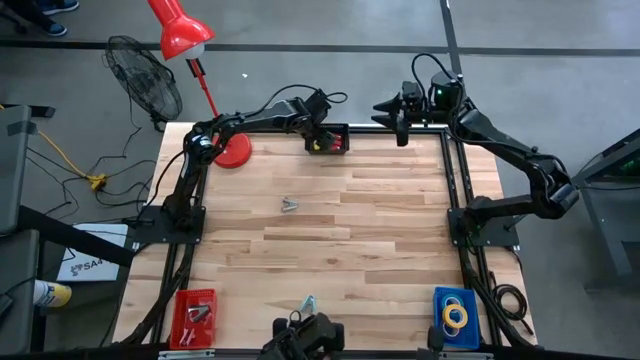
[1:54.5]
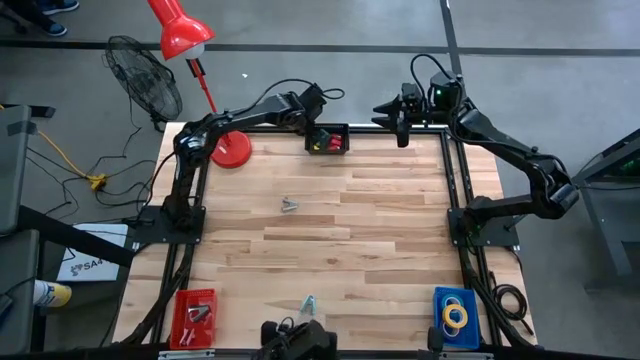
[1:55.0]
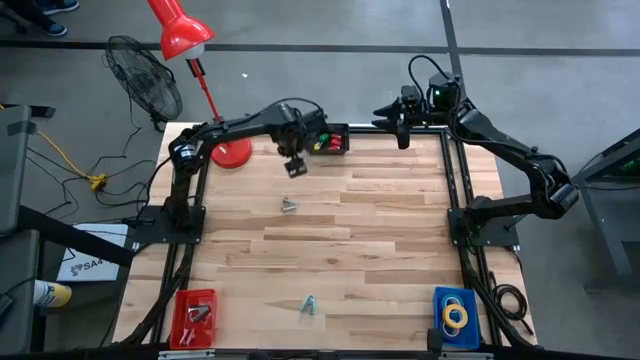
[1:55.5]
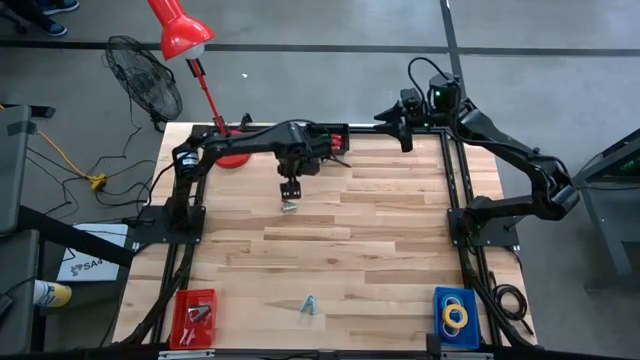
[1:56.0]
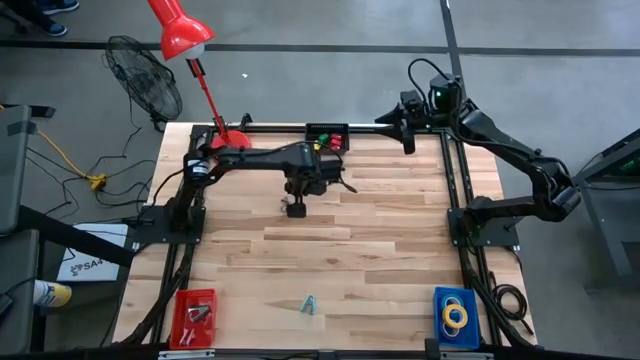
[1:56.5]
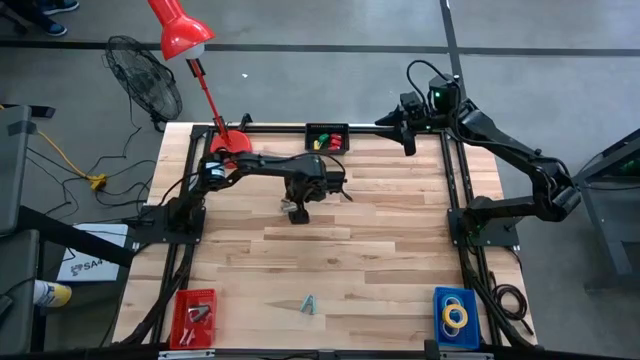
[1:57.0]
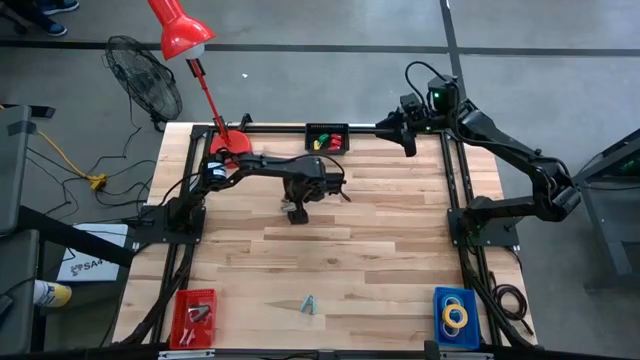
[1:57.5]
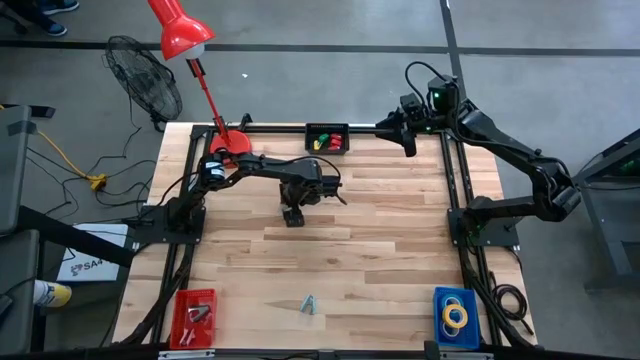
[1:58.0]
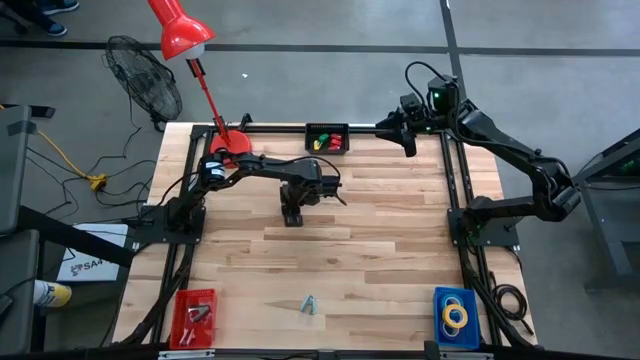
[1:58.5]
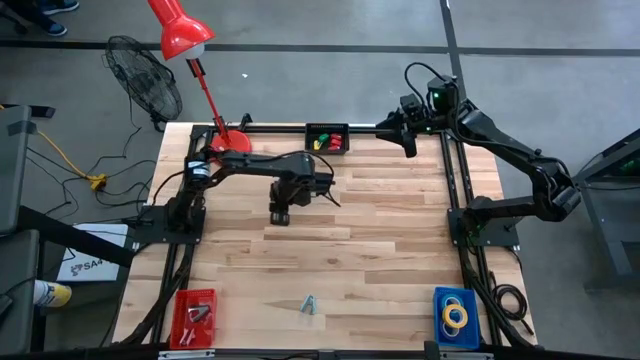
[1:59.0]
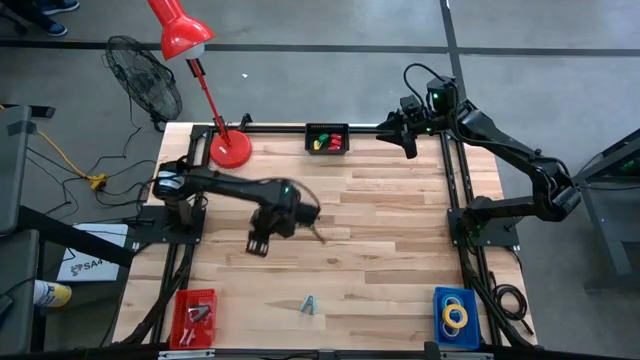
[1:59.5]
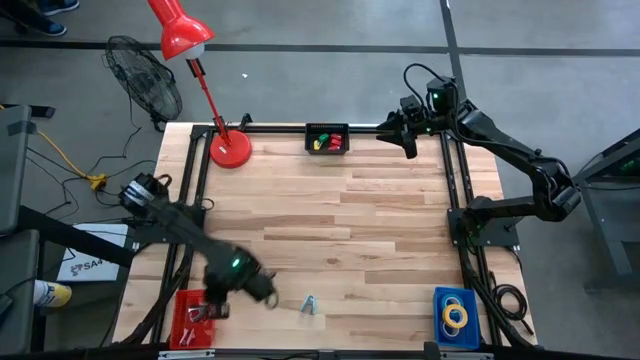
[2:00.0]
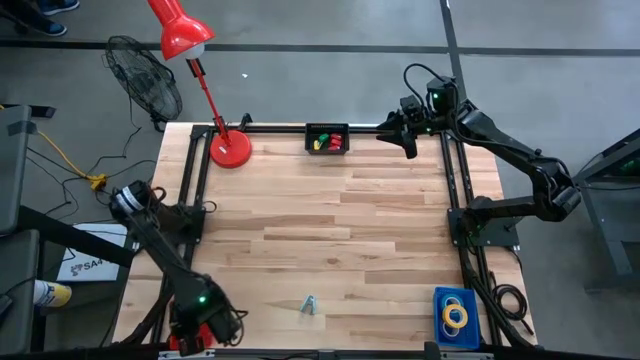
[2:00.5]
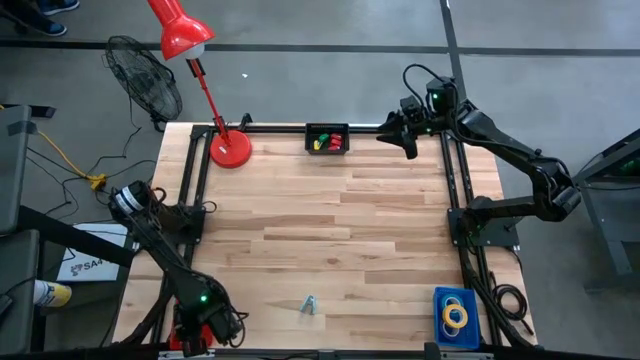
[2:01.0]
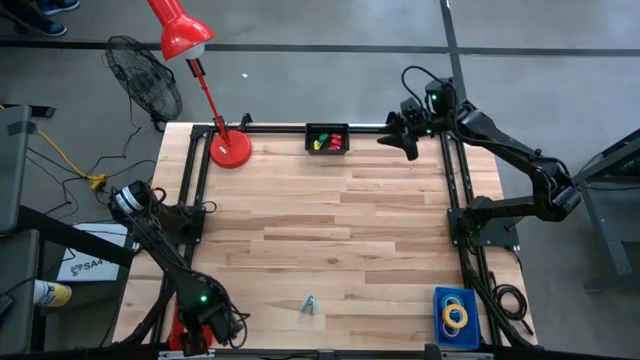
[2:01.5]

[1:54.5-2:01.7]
Task: Pick and place Stapler, Stapler remover, tape
Put the gray staple remover into the red basket

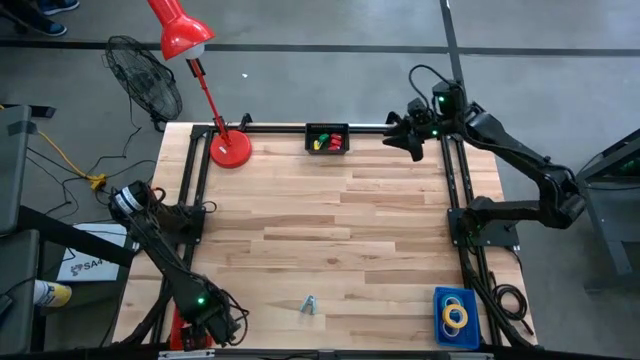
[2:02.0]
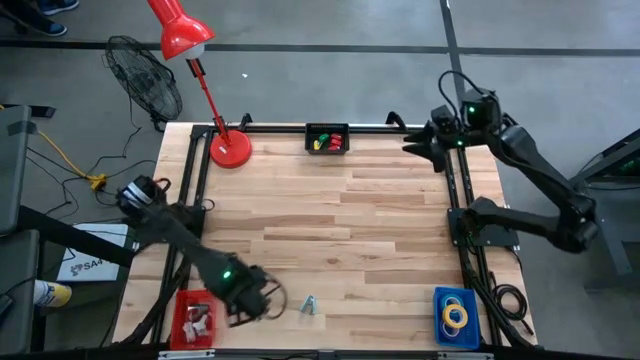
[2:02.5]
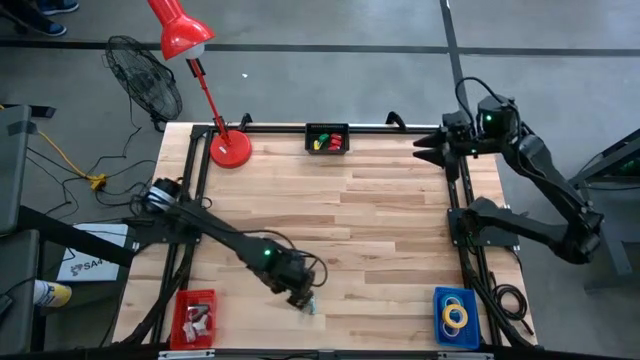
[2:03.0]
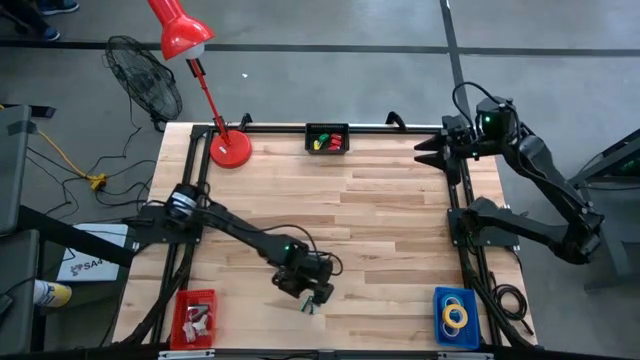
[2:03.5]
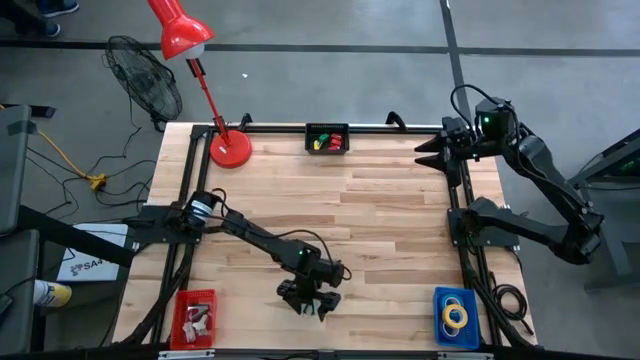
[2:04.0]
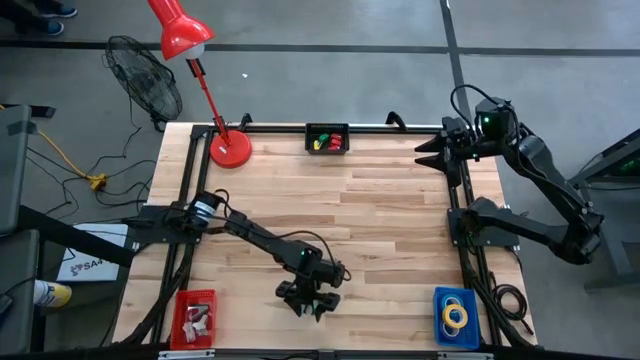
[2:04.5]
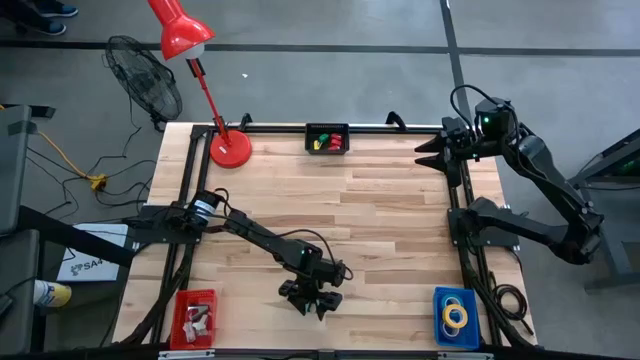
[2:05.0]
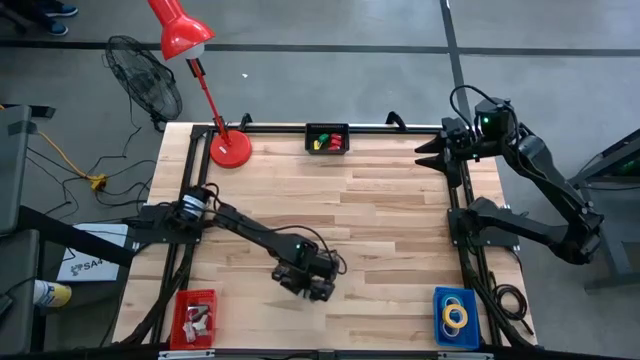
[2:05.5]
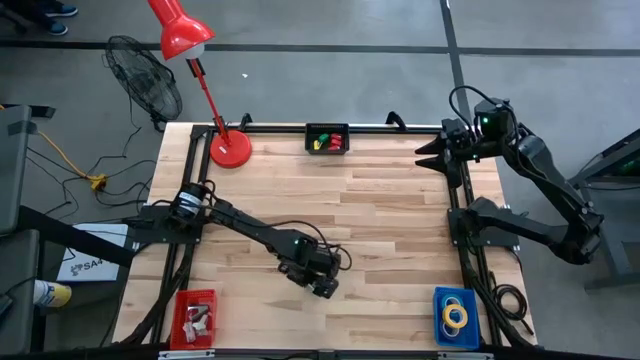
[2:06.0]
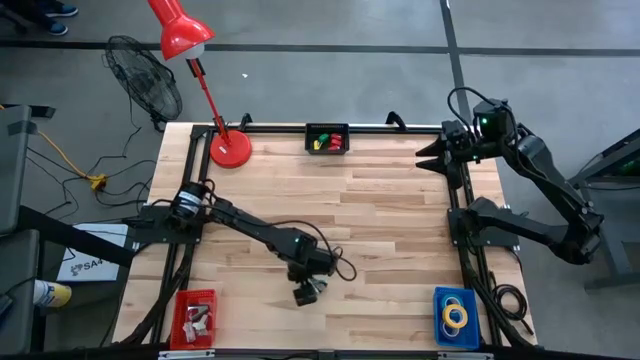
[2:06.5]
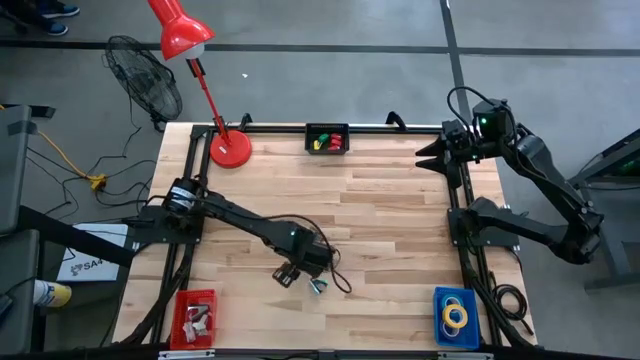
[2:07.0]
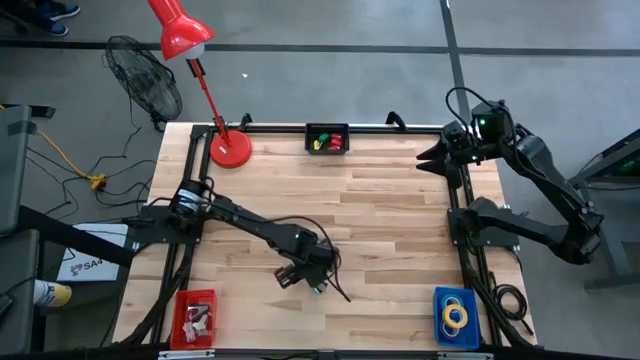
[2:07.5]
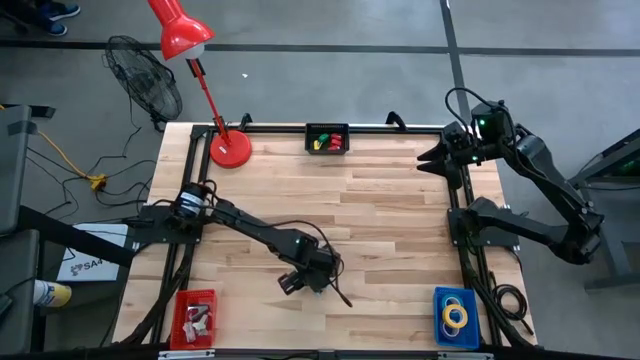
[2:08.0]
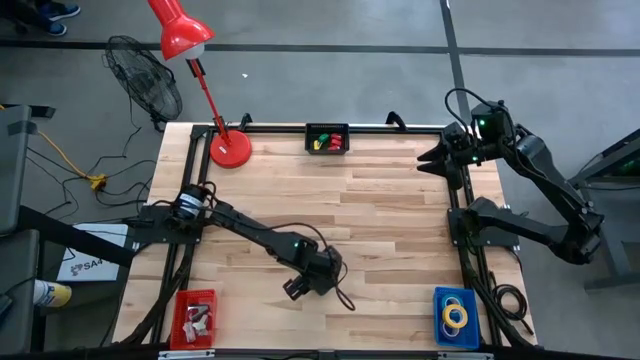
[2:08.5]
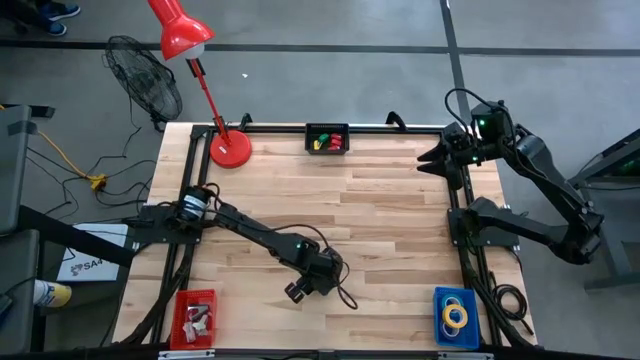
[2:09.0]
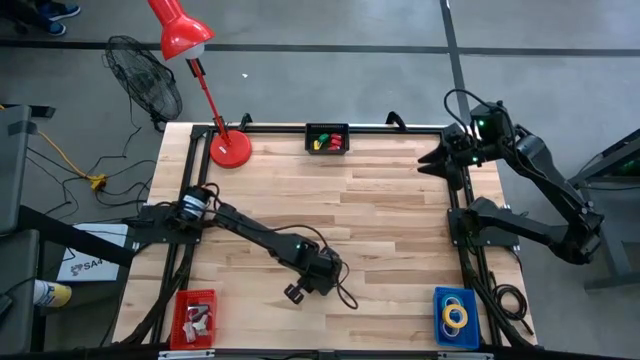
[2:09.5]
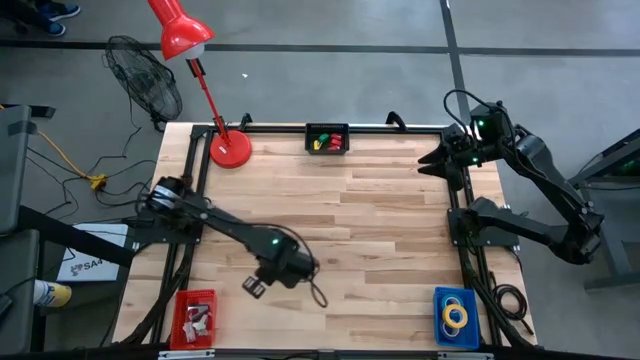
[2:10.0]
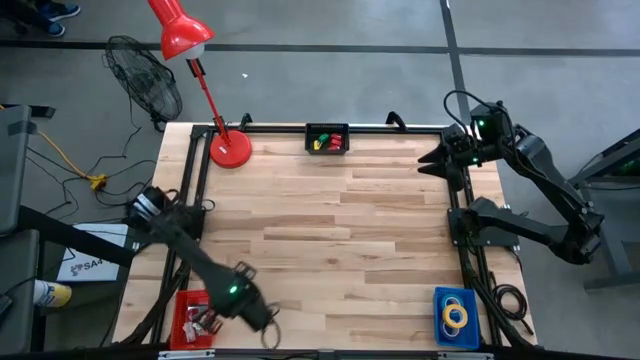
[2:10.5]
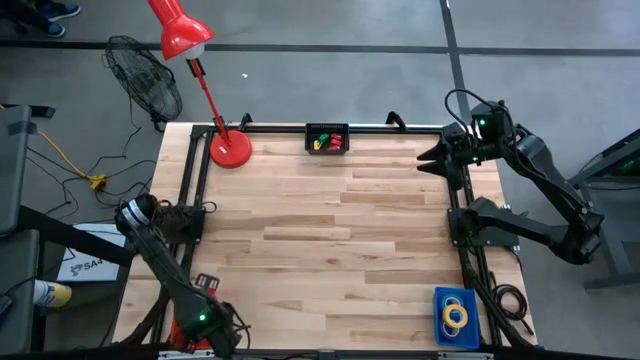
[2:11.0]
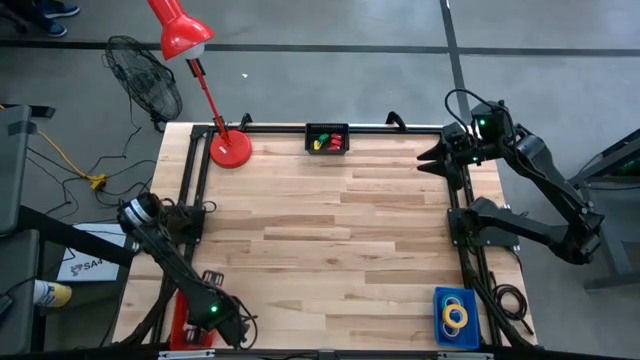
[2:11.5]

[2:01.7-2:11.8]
Put the blue staple remover into the red basket

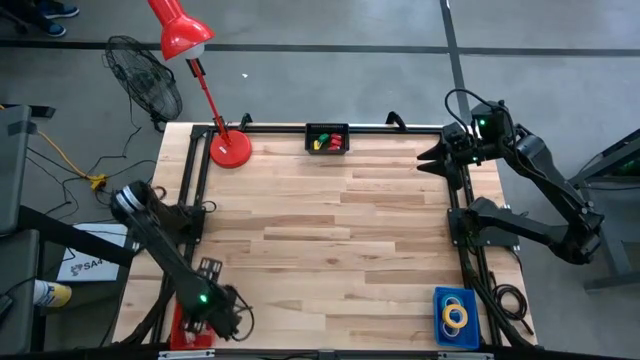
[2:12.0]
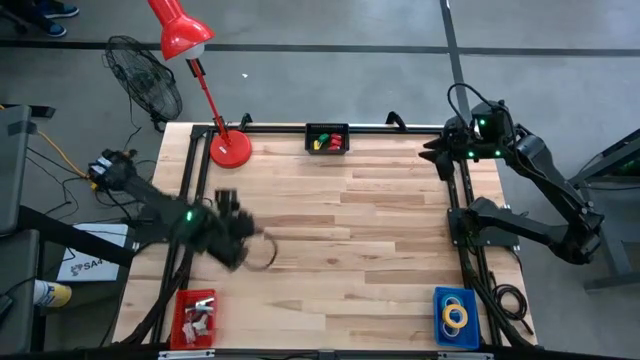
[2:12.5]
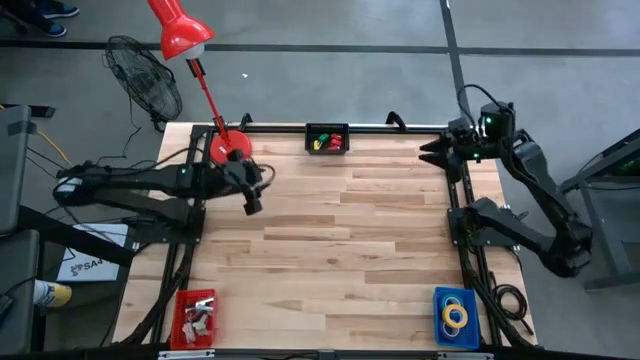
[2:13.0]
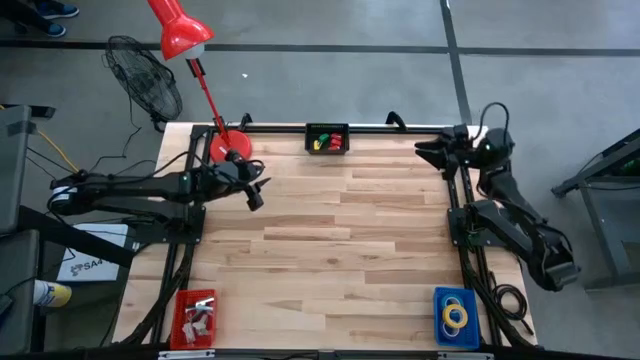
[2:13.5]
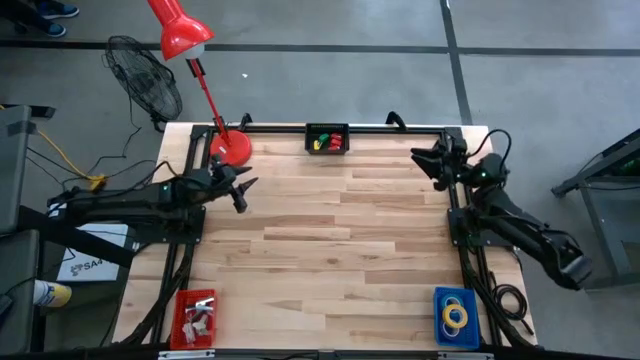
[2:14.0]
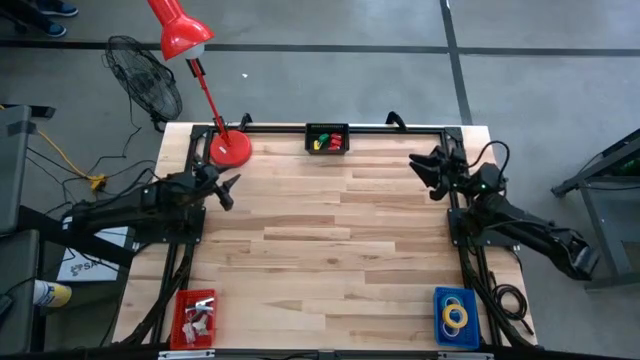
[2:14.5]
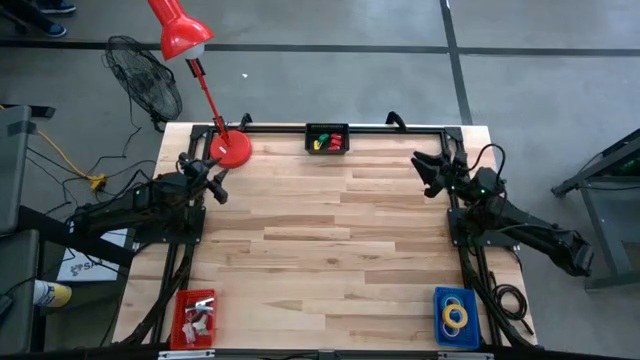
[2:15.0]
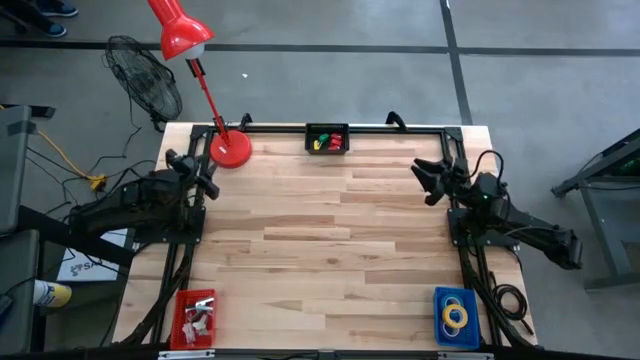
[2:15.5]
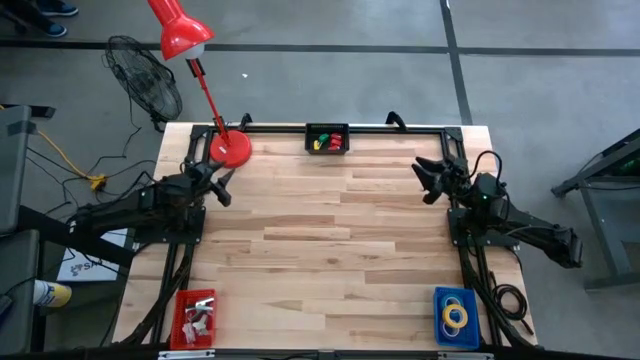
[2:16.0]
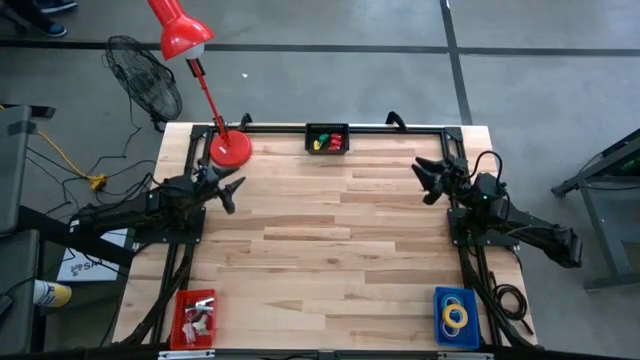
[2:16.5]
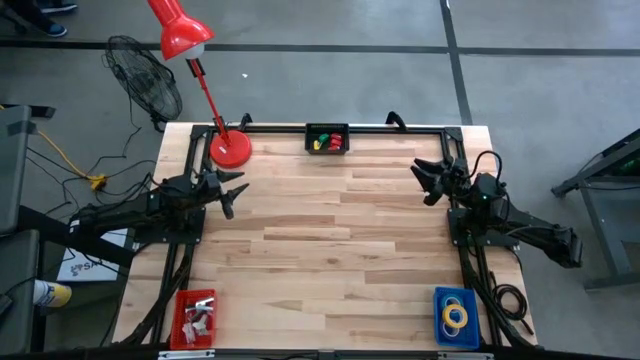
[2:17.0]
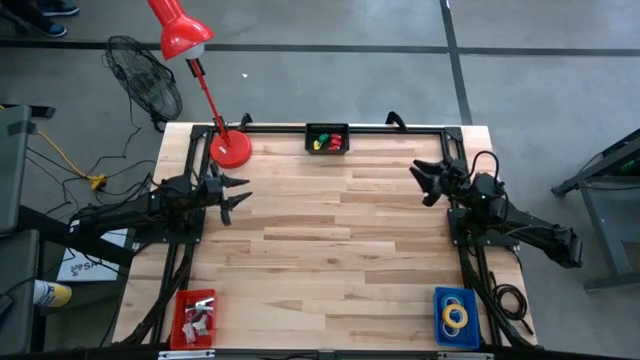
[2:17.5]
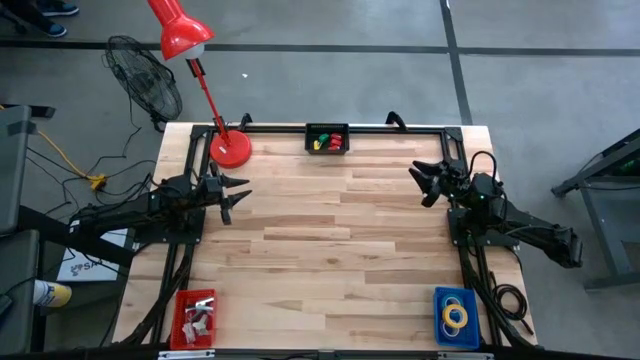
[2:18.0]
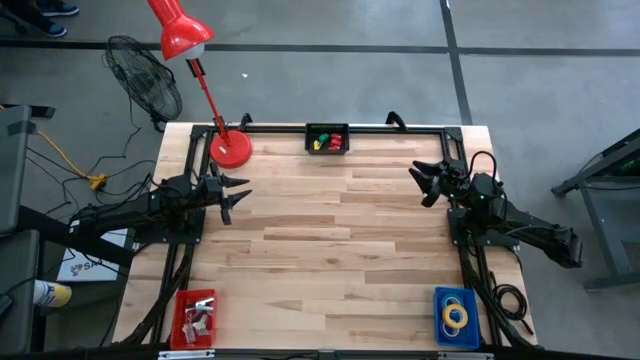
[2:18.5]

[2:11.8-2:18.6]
Return to Home Position
